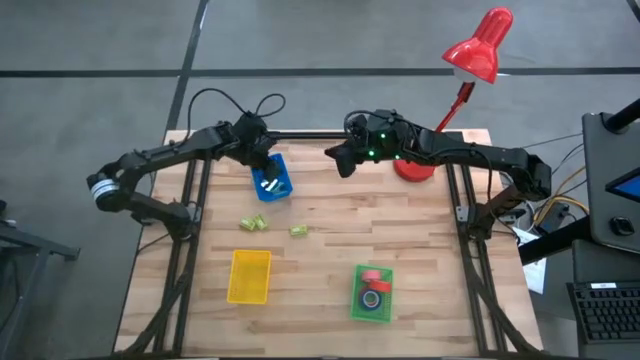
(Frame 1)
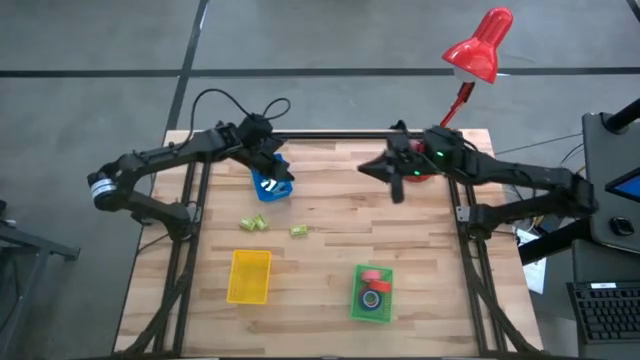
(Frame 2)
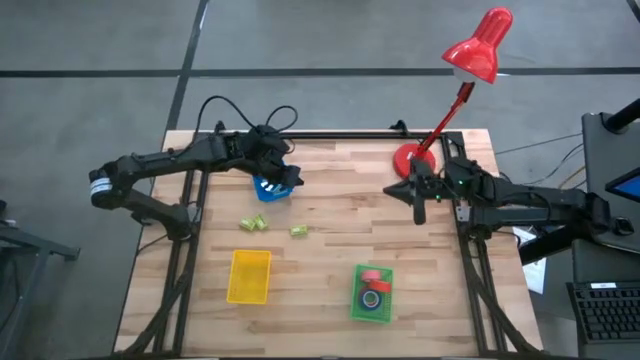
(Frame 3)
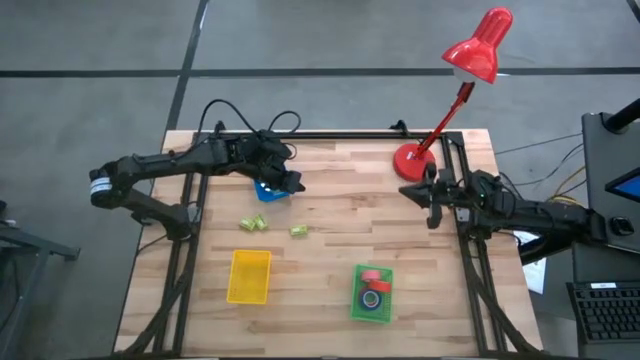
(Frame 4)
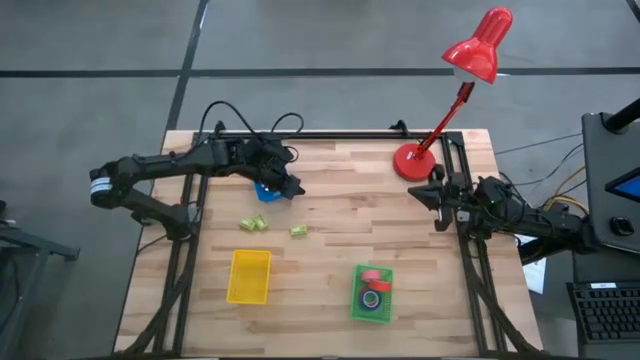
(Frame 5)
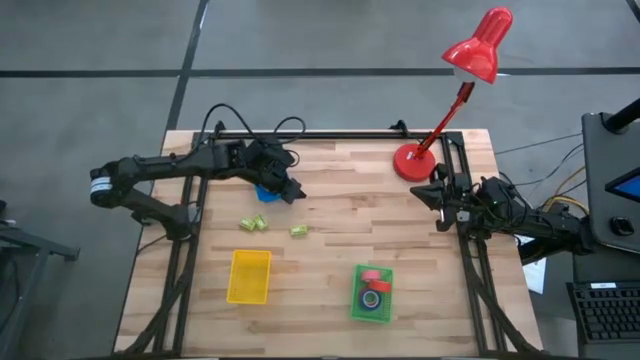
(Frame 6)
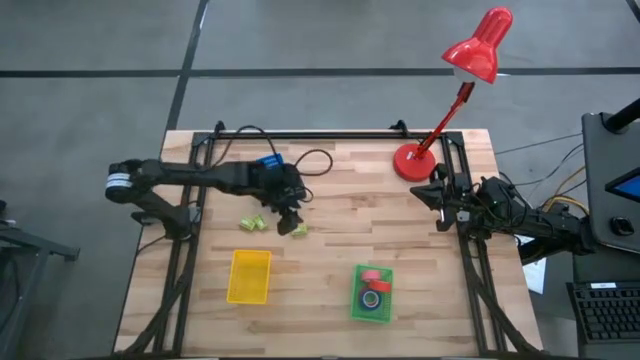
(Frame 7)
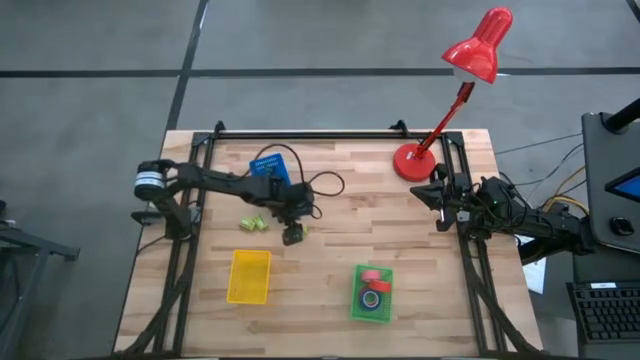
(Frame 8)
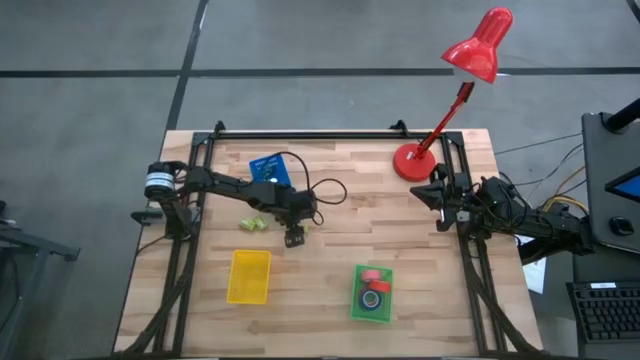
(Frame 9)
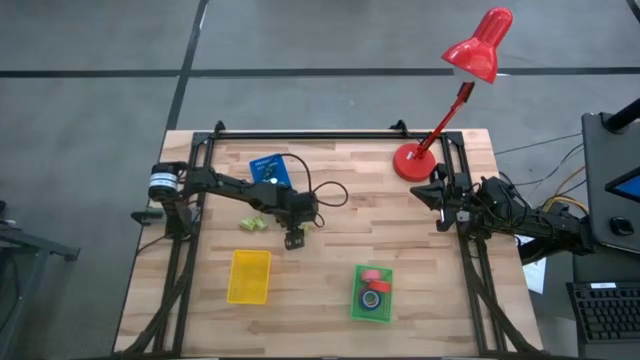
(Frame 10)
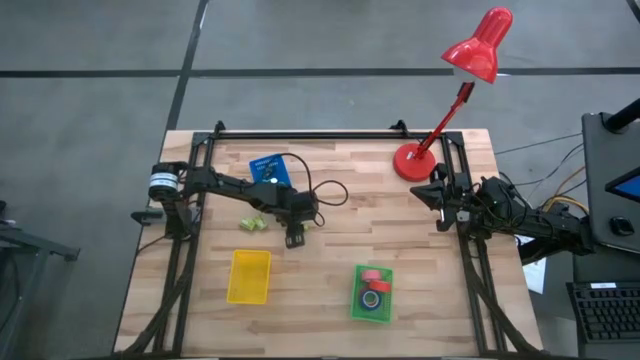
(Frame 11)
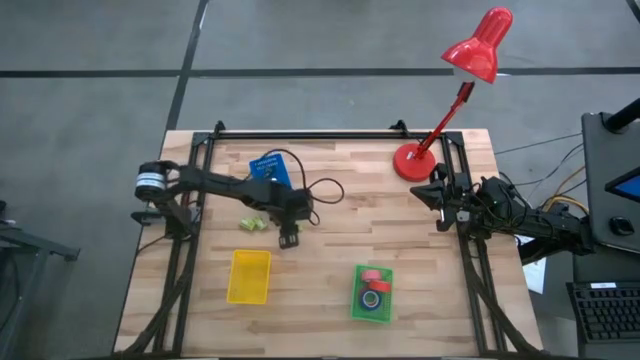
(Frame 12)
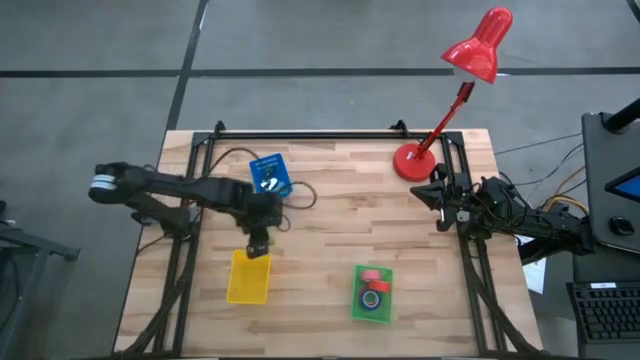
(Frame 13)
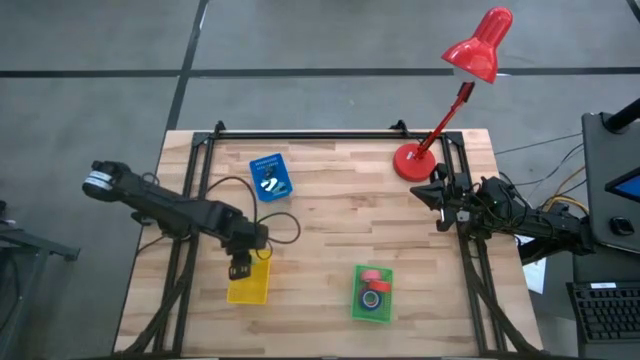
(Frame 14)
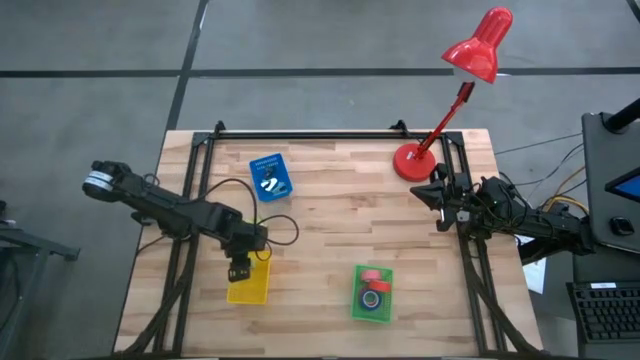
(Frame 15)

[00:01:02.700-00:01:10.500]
Task: Pick and place Stapler, Stapler remover, tape
Put the right staple pin box into the yellow bin

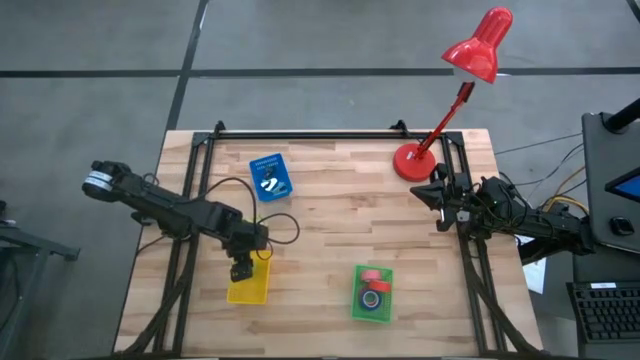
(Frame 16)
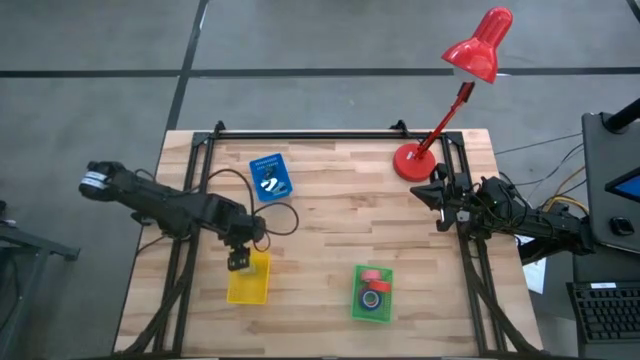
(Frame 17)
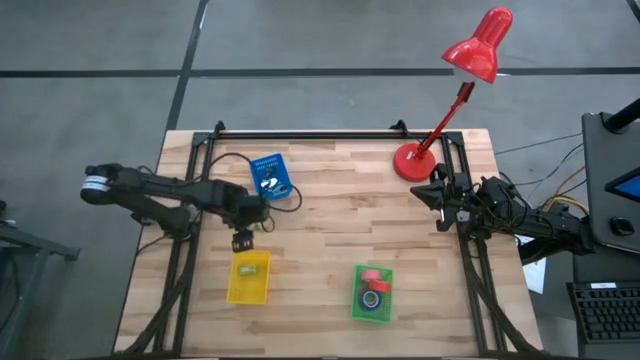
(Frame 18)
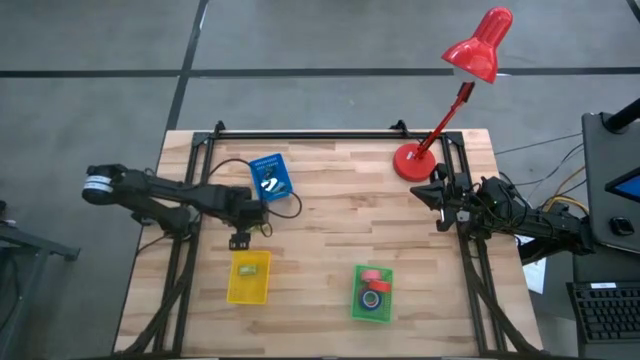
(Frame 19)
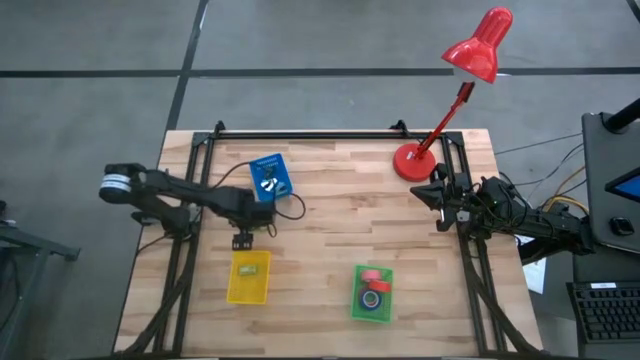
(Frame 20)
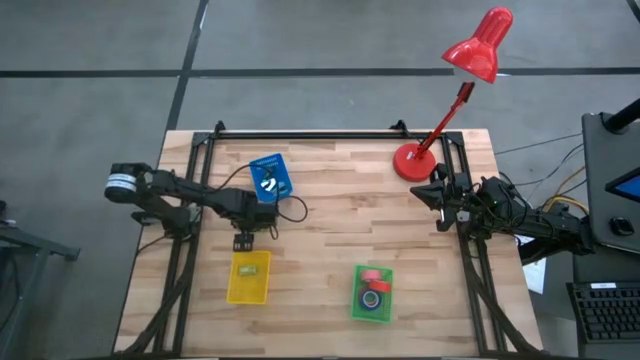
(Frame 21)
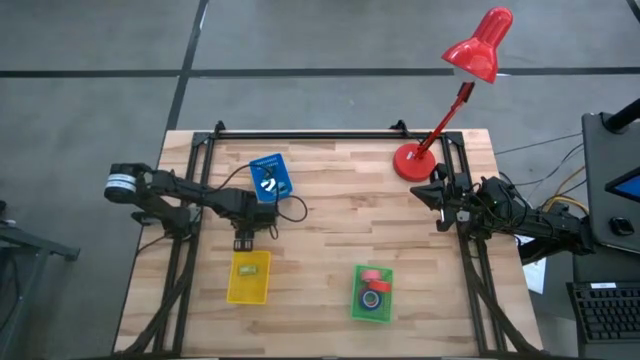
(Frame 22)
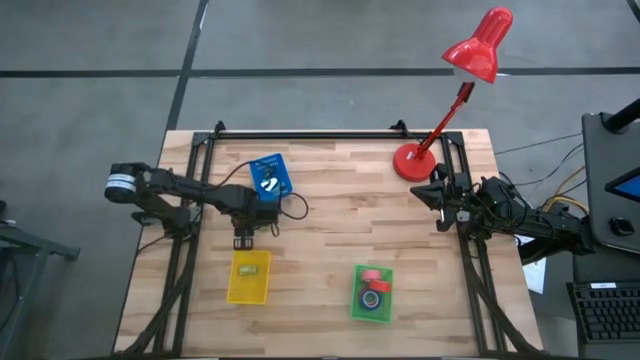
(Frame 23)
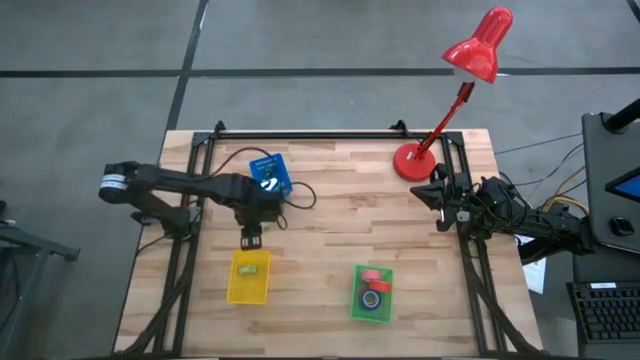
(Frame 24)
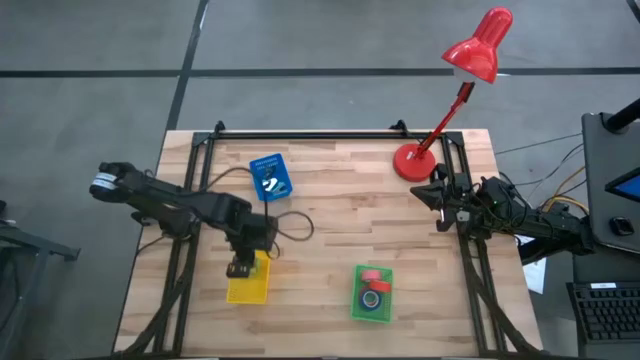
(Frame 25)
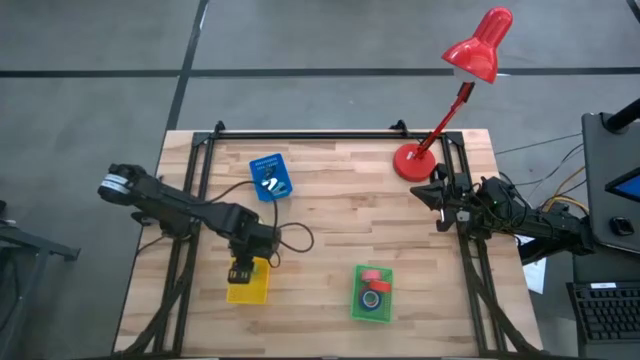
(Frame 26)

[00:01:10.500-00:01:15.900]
Put the left staple pin box into the yellow bin

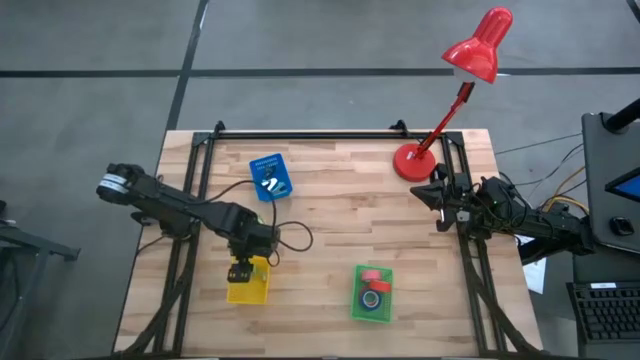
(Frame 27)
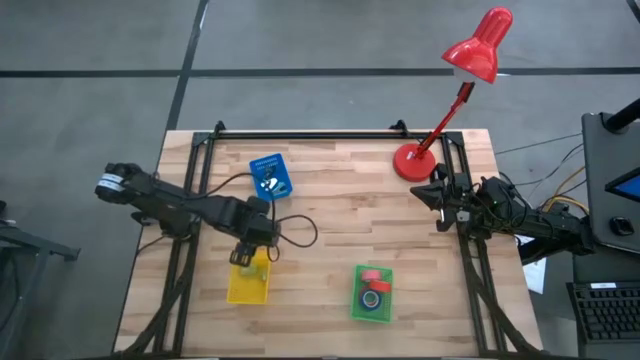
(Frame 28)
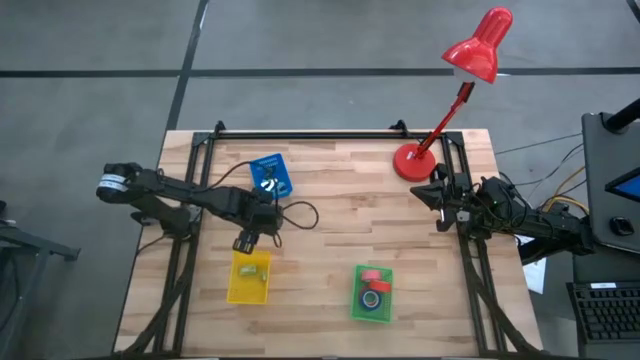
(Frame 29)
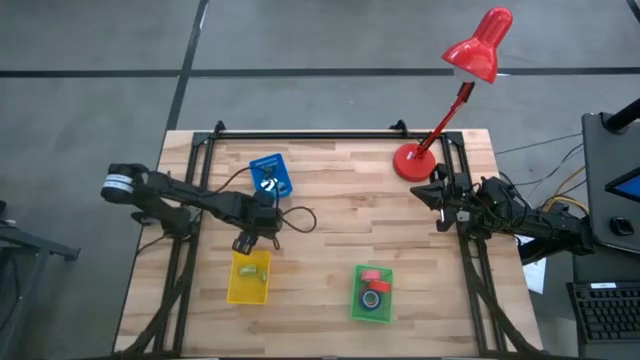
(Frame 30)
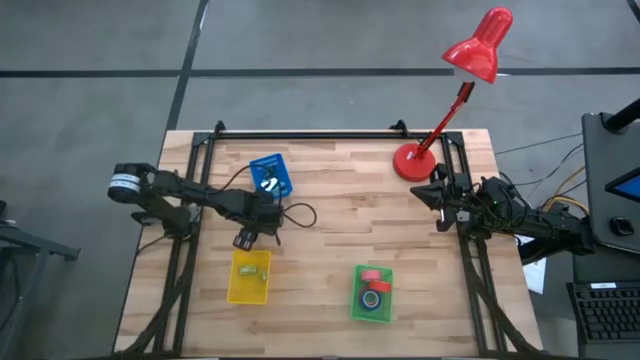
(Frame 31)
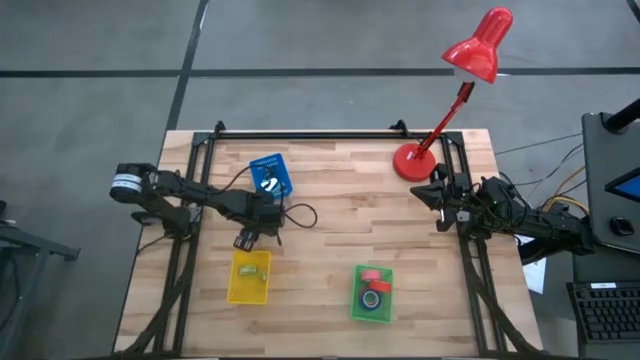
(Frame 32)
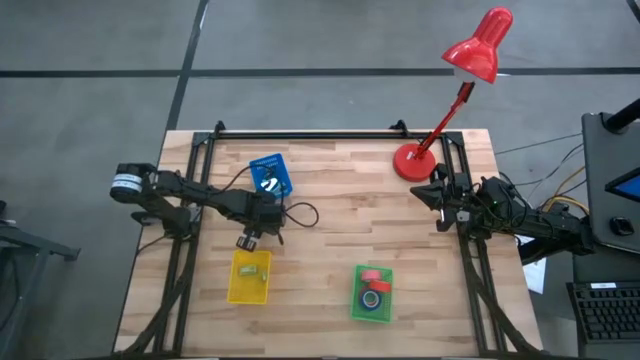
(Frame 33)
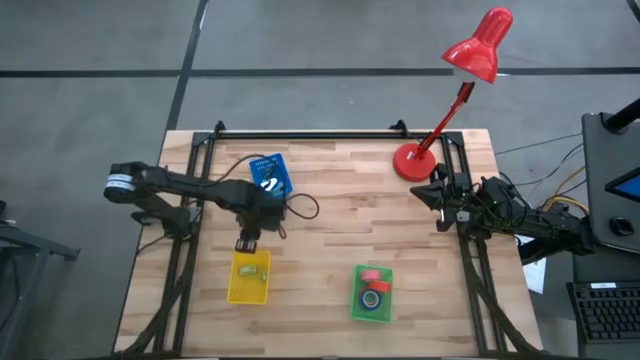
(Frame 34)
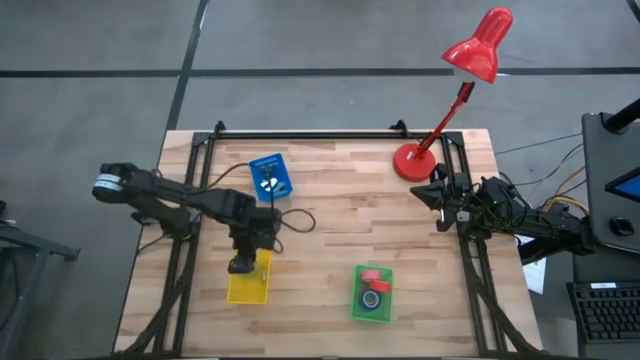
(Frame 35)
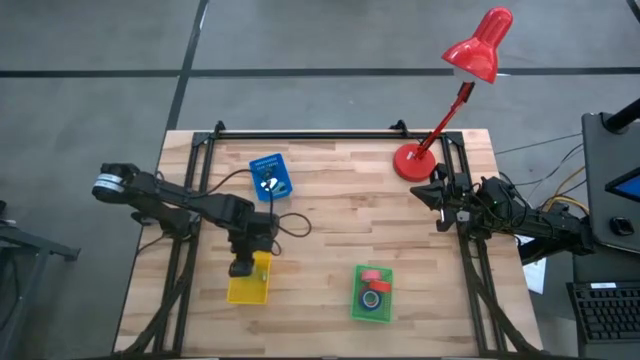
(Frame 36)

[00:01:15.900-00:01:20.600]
Put the staple pin box into the yellow bin

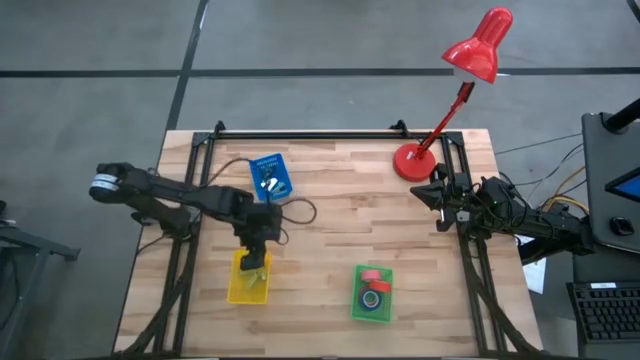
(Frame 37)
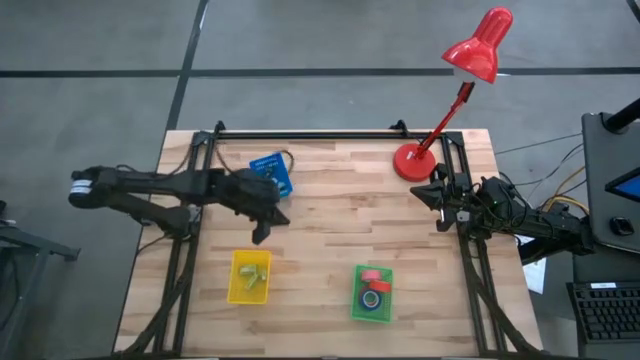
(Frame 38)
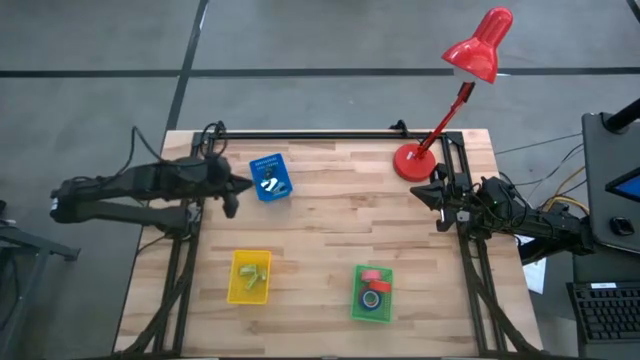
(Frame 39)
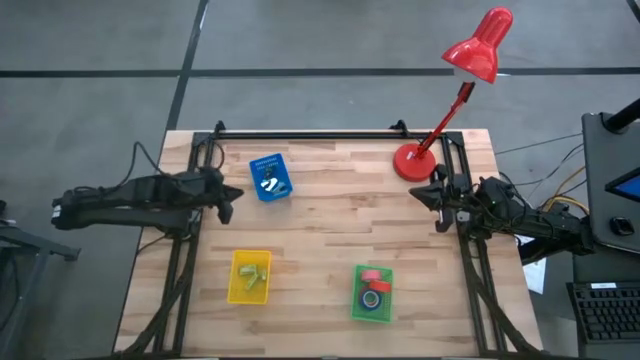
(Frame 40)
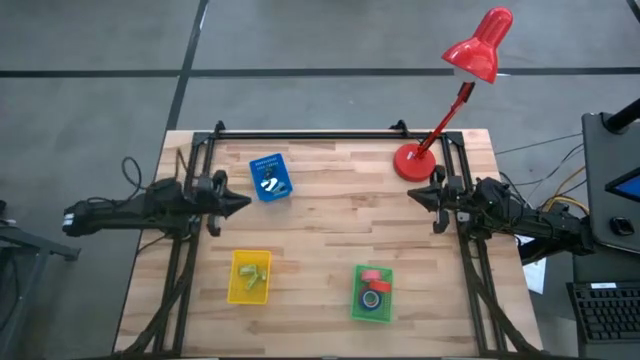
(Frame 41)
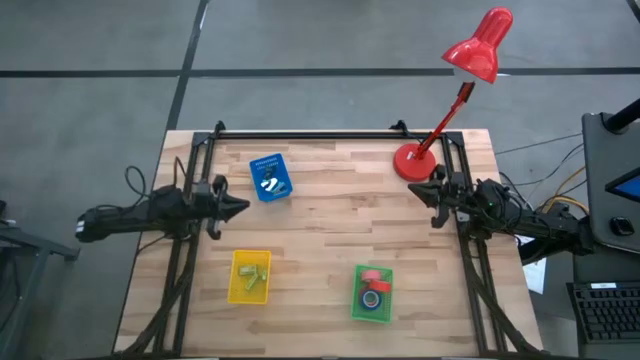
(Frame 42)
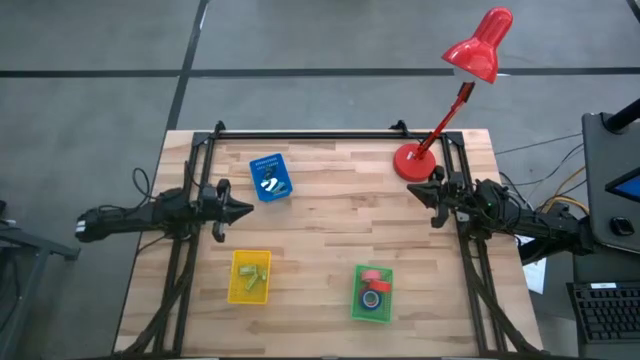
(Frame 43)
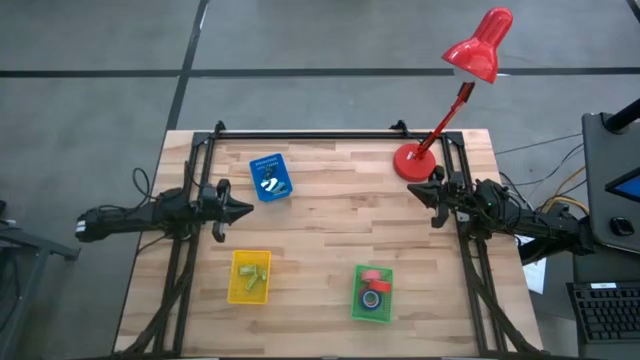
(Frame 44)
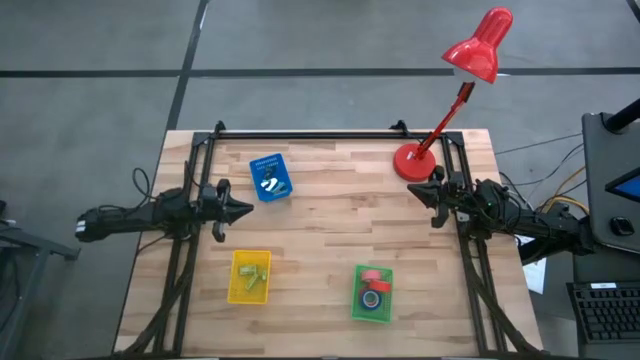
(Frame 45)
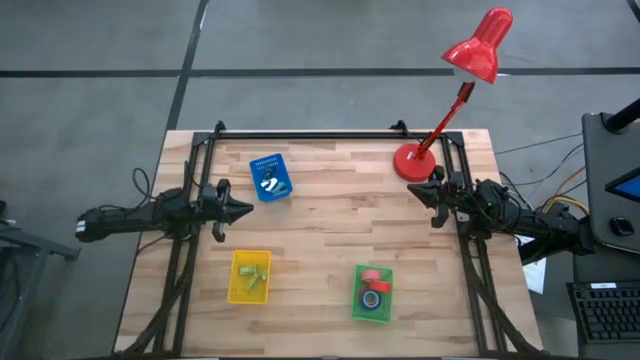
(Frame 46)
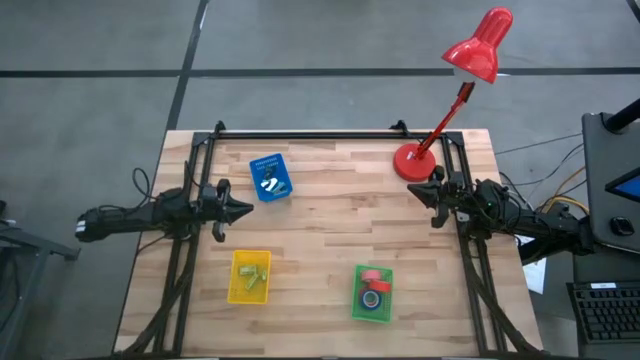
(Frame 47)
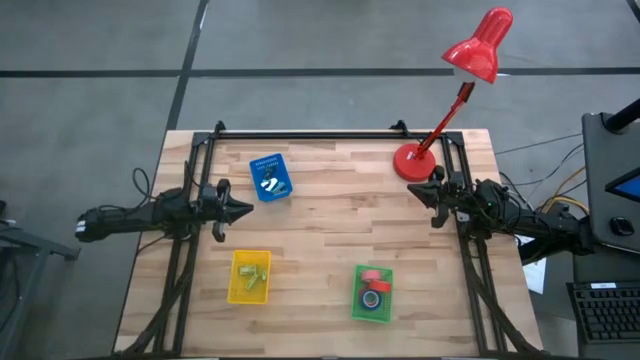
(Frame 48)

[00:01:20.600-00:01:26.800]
Return to Home Position
